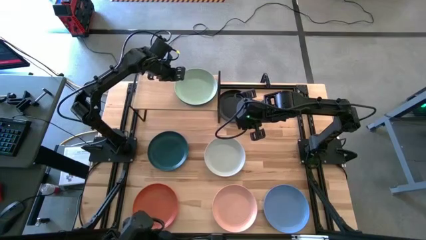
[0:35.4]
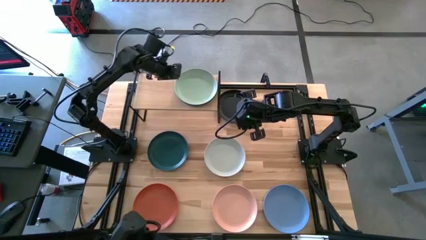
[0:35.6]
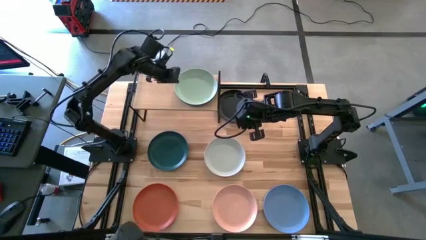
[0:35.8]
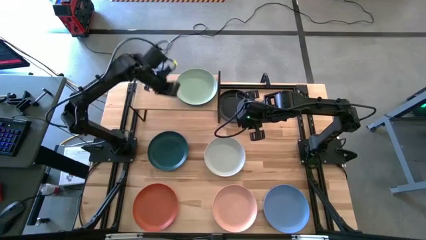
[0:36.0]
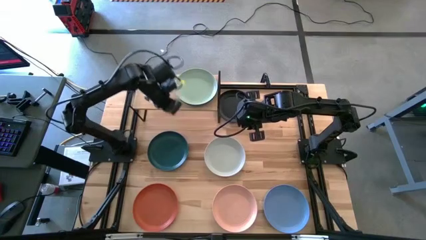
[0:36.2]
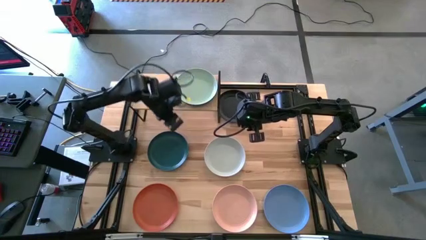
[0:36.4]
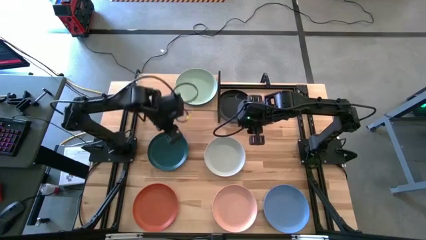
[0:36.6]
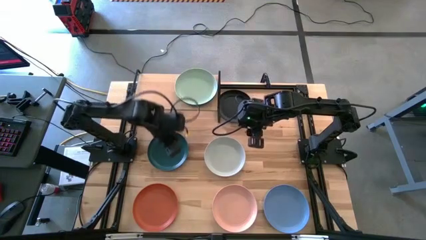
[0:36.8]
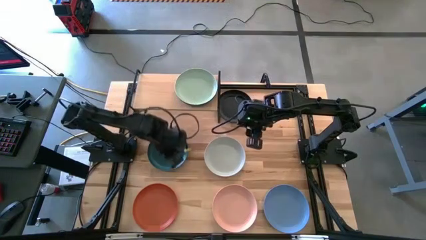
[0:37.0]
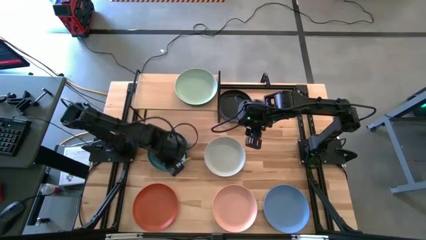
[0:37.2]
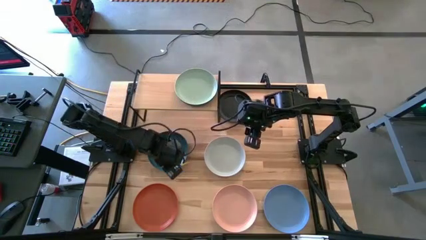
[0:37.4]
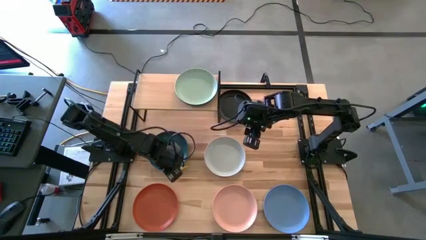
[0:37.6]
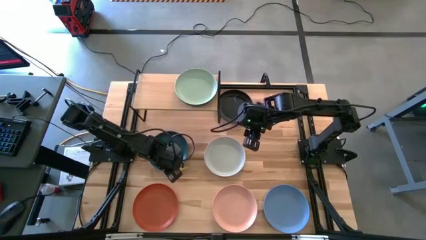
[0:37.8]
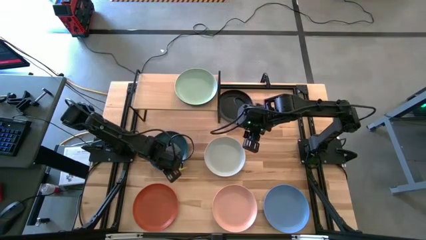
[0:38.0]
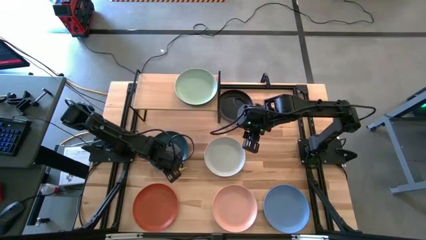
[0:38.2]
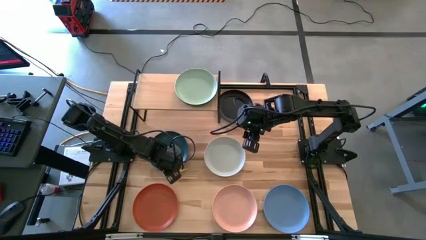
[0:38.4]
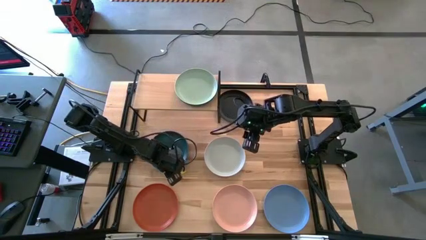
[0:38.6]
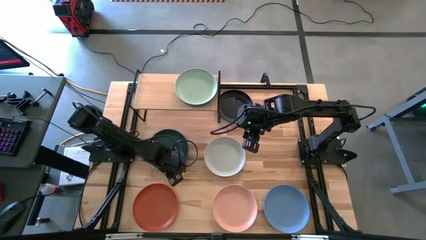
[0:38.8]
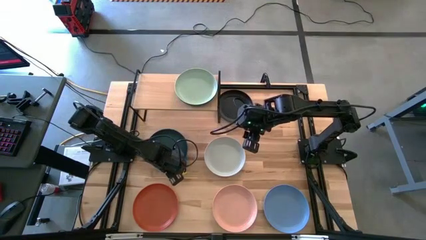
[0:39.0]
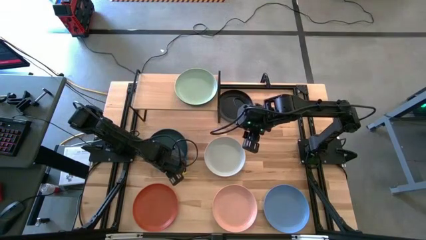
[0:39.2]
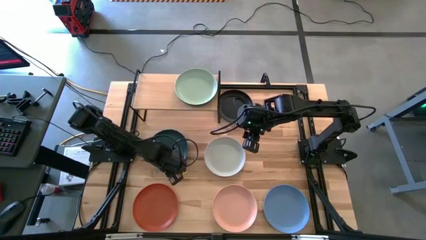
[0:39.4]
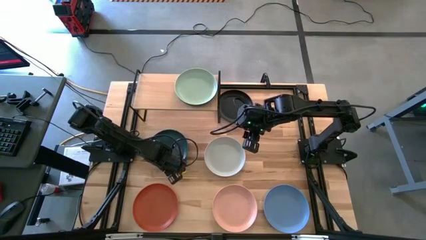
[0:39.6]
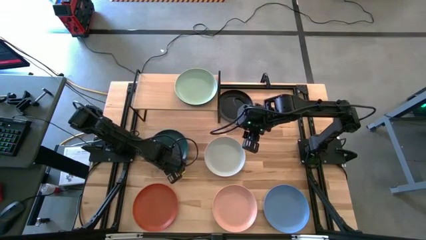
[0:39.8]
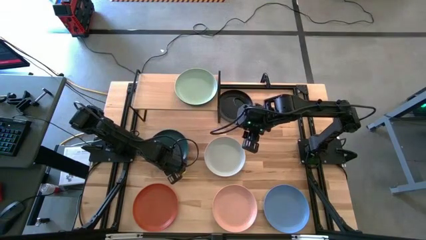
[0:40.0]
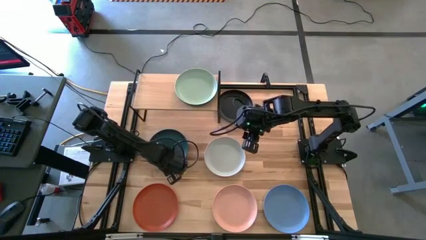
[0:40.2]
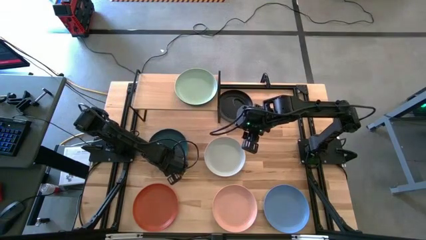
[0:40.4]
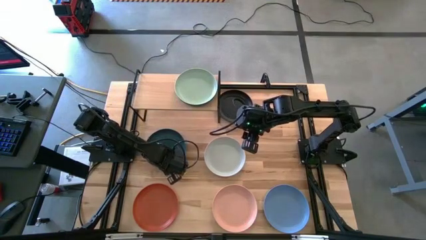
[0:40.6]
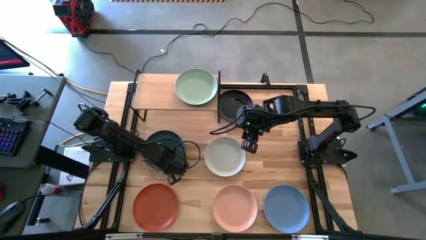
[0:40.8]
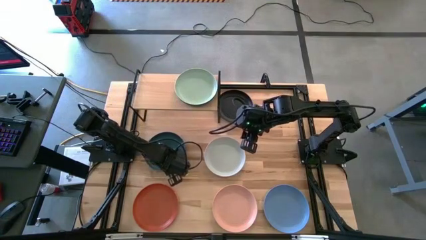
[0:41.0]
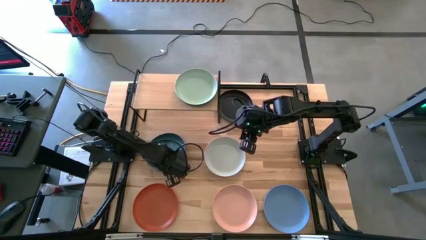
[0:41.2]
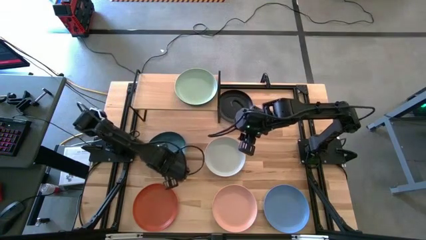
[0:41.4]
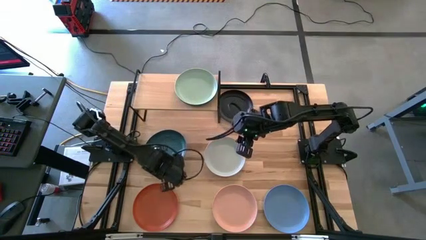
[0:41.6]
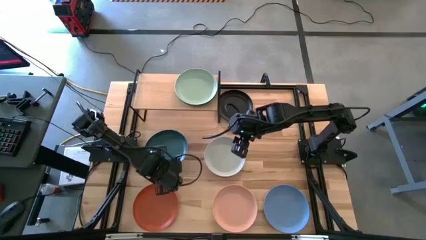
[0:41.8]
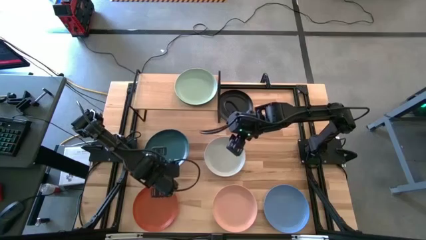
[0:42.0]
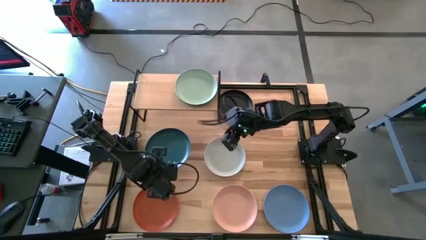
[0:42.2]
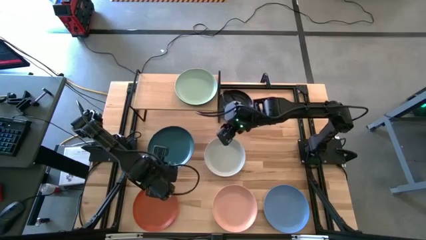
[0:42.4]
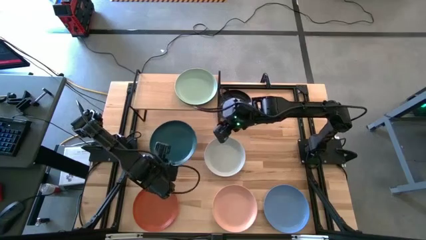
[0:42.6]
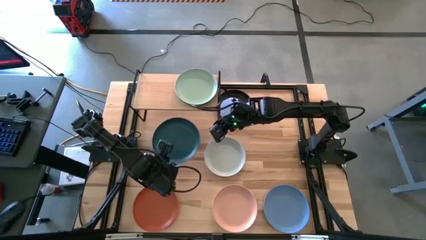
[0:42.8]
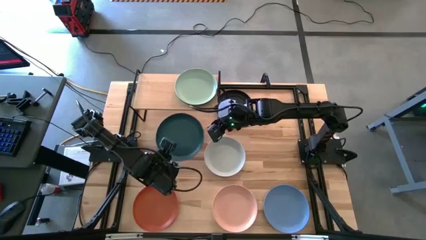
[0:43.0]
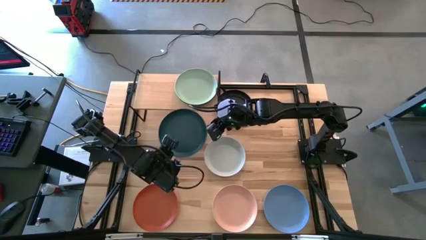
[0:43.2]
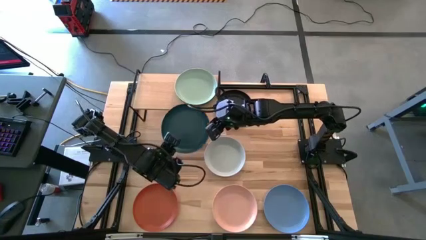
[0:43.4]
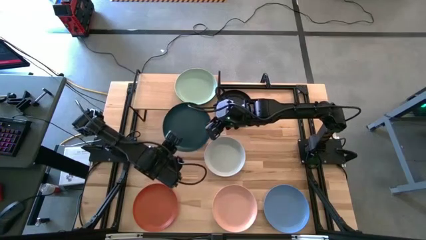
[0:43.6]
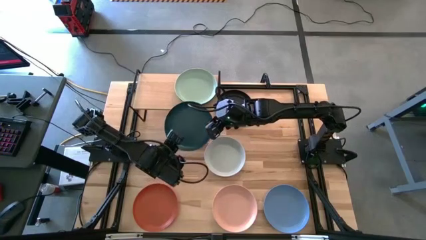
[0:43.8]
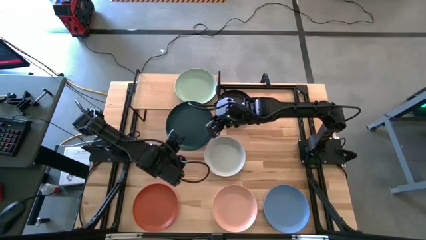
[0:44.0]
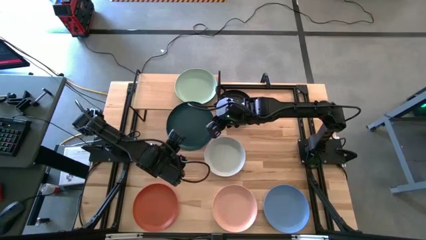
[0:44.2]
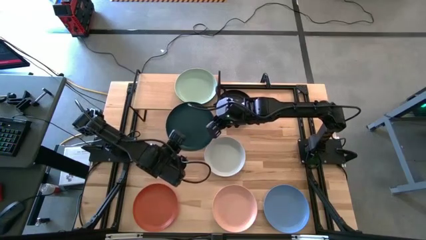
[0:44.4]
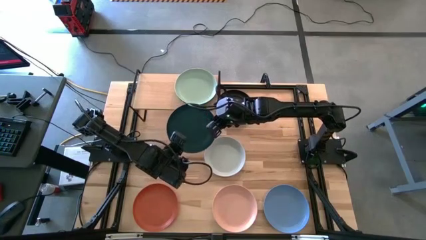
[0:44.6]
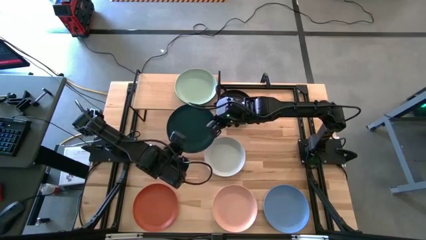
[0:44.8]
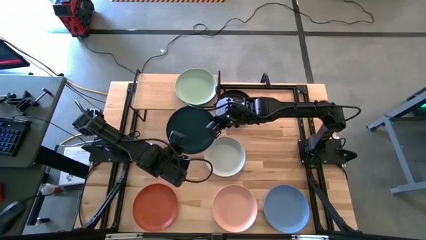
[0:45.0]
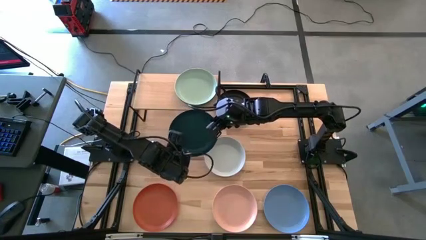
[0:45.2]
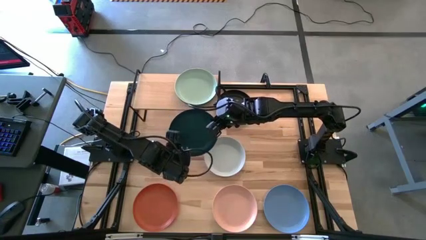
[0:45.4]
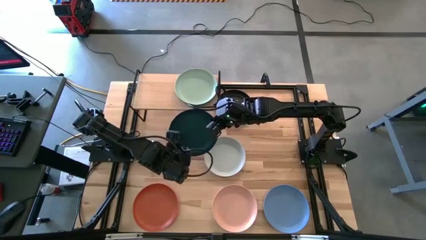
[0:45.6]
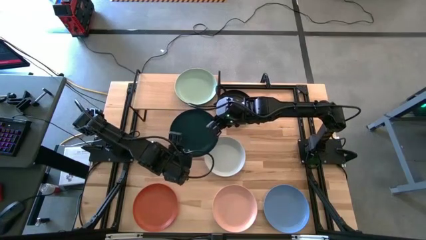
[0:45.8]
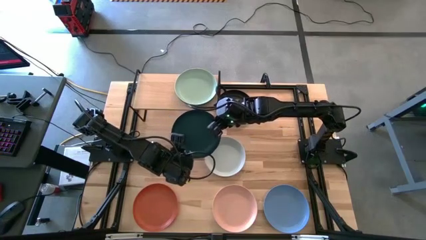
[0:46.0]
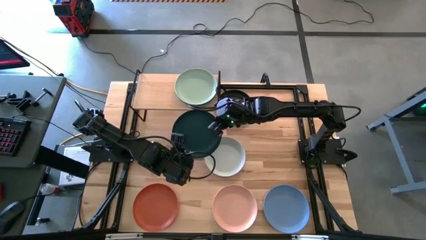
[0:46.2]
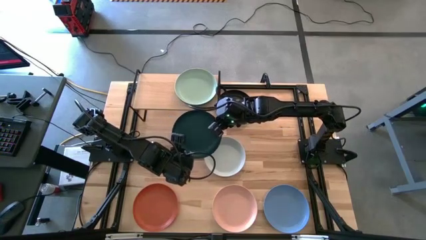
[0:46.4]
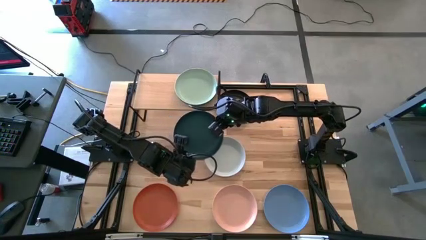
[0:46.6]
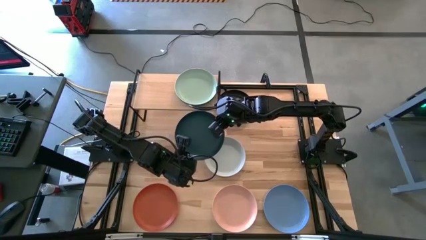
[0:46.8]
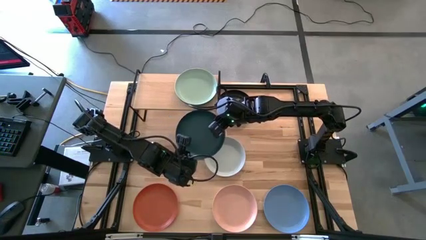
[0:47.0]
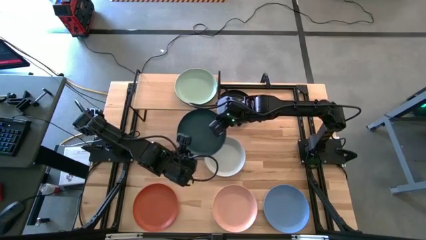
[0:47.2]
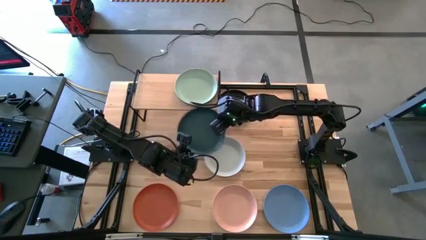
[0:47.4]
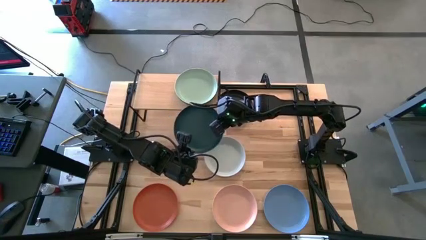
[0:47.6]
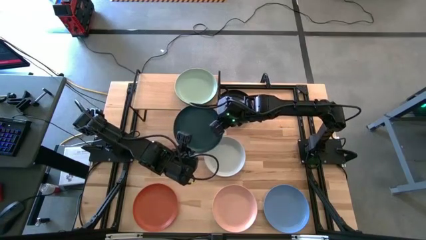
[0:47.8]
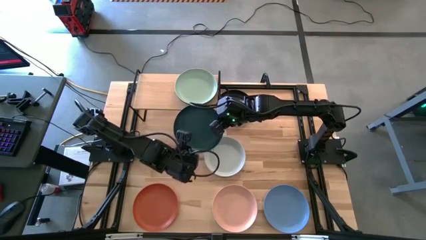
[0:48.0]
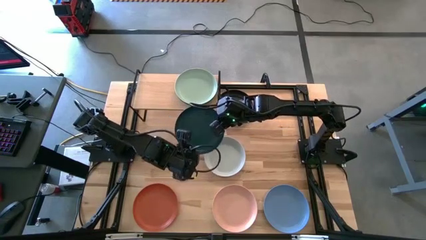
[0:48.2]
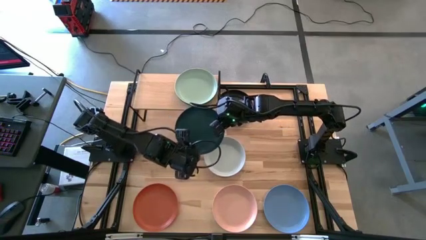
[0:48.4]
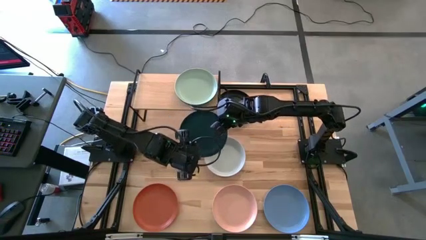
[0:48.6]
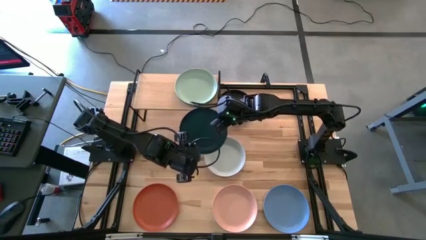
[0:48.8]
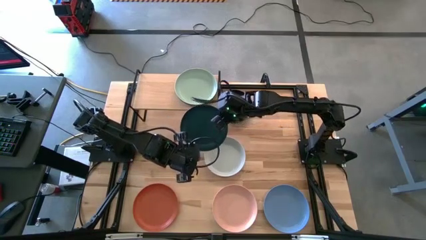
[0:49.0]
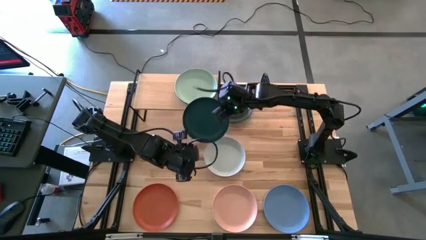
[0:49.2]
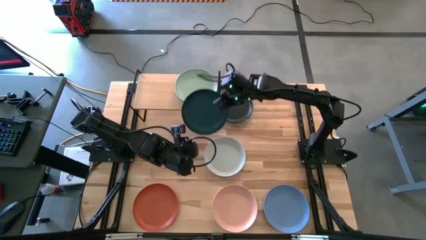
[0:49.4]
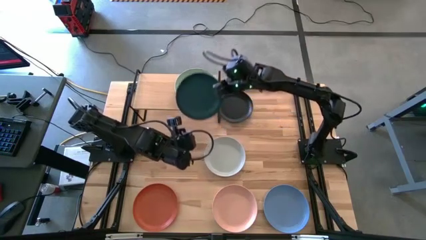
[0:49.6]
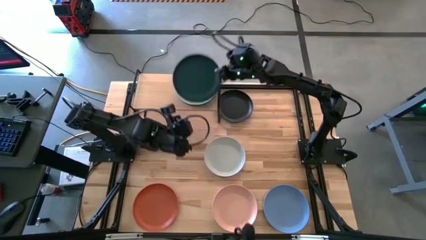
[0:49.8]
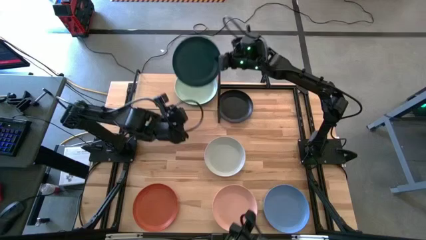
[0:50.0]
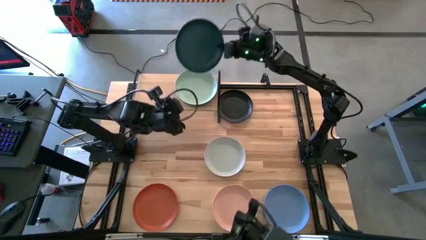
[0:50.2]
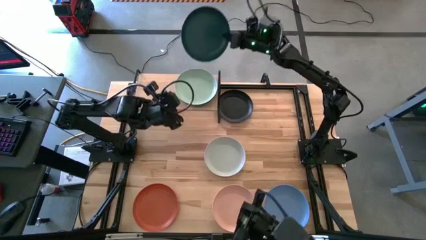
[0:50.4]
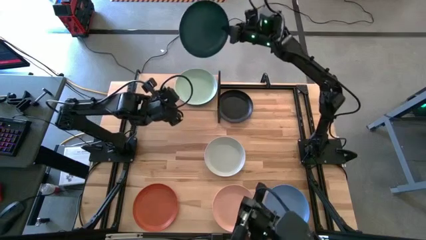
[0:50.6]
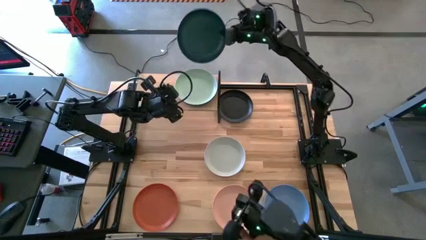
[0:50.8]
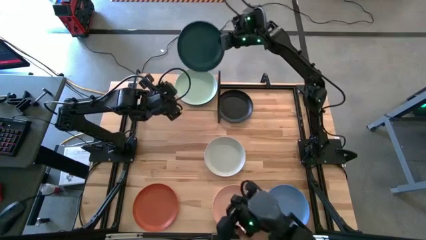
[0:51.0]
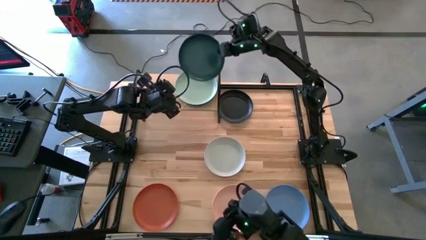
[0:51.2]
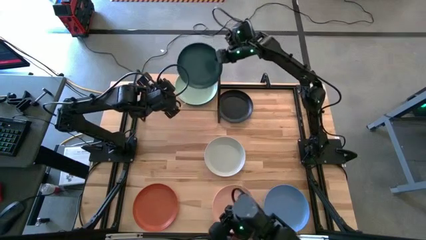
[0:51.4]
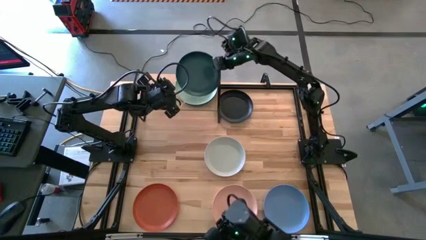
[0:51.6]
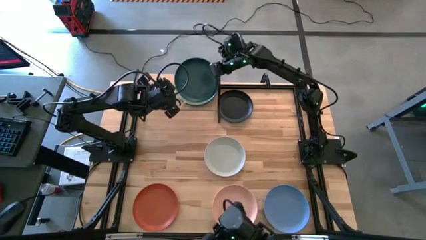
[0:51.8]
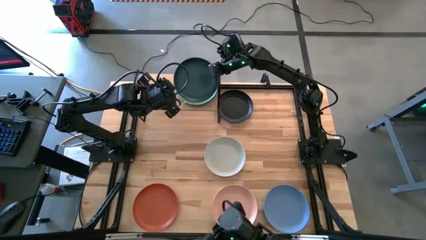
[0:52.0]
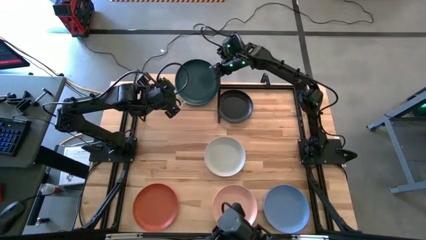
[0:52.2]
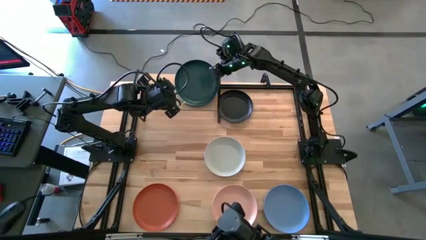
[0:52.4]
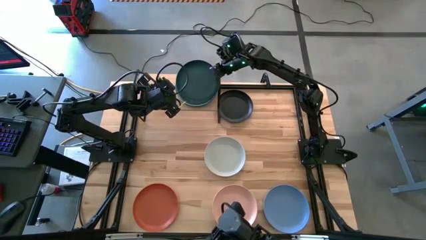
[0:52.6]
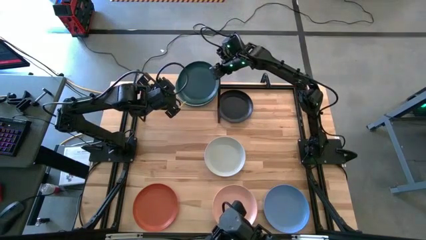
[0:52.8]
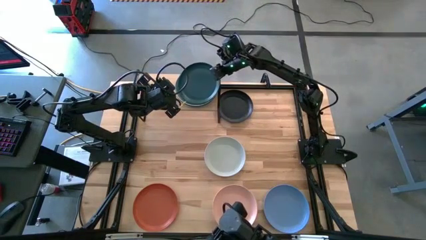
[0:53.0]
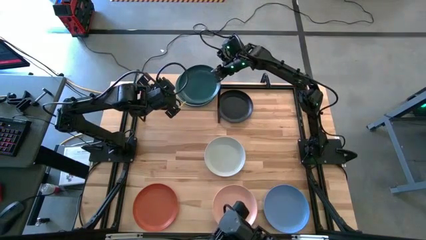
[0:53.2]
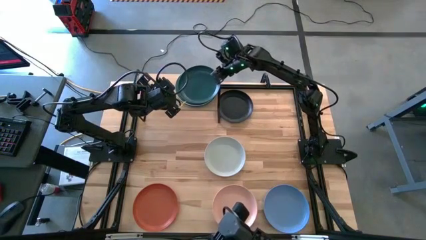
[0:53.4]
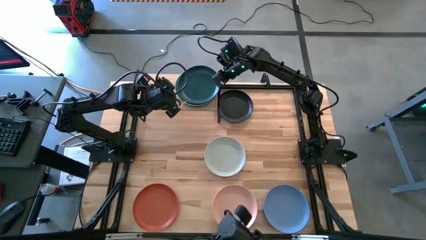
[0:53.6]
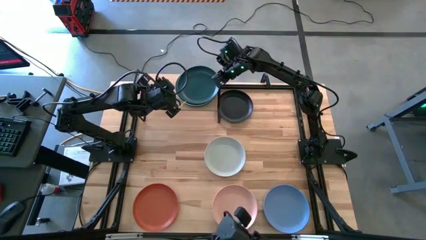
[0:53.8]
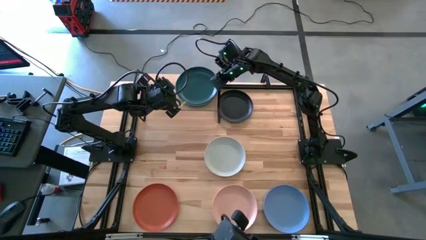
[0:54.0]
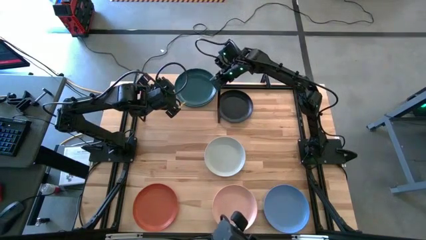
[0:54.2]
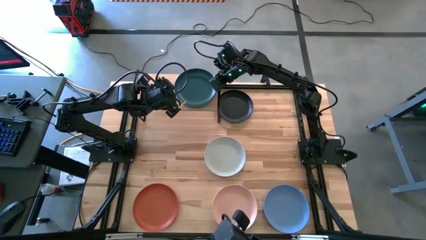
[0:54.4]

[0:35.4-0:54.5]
Task: Place and stack plates onto a shelf
Stack the dark blue plate on top of the green plate on the shelf
